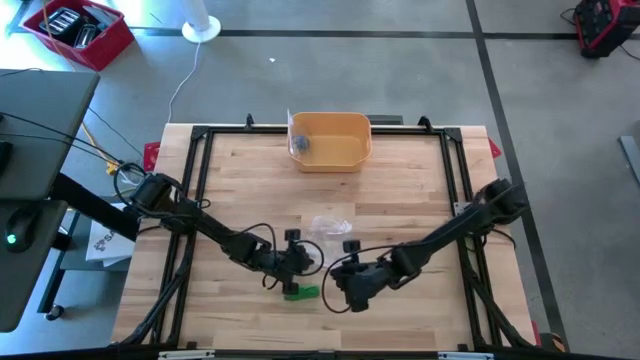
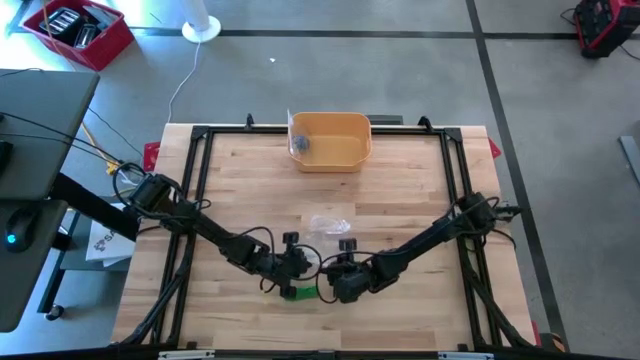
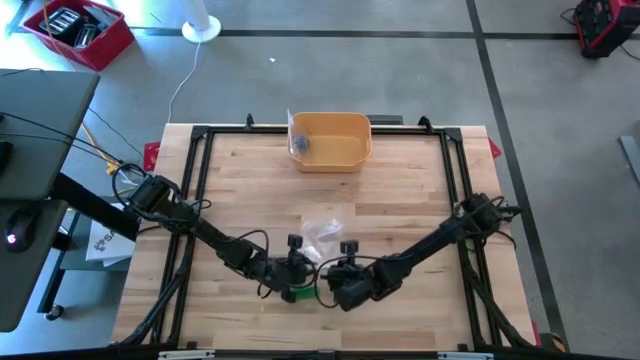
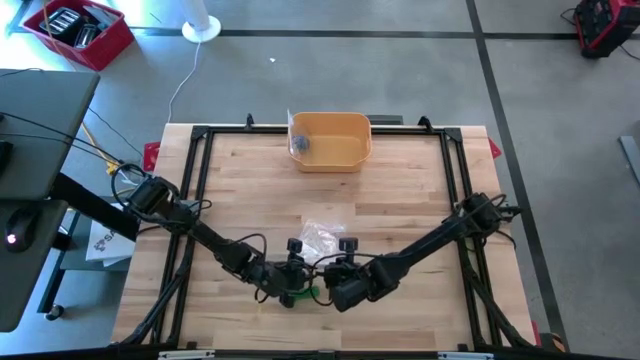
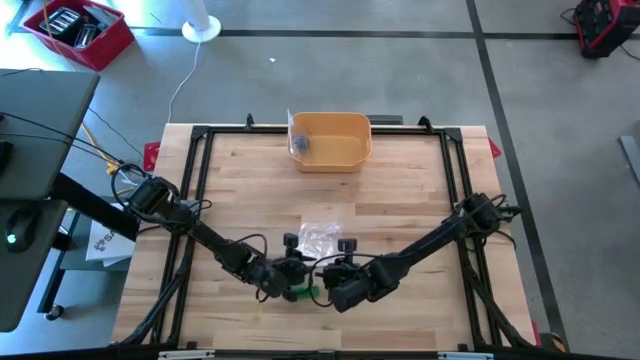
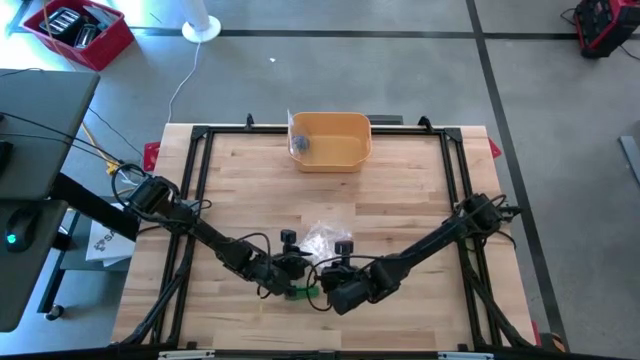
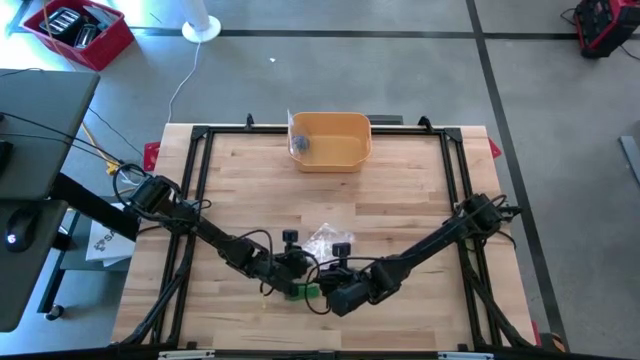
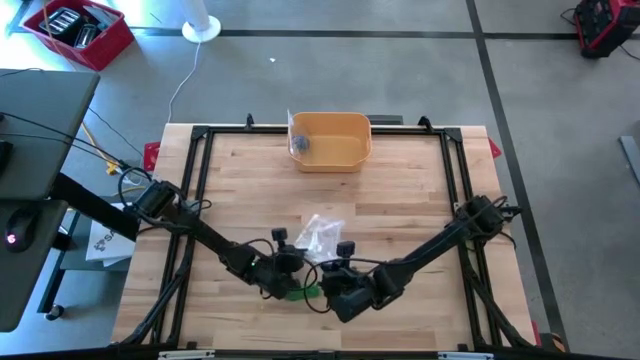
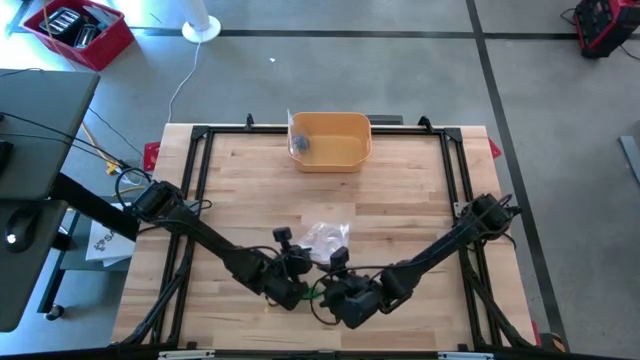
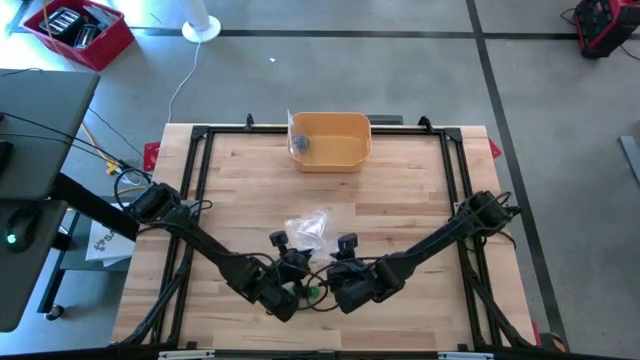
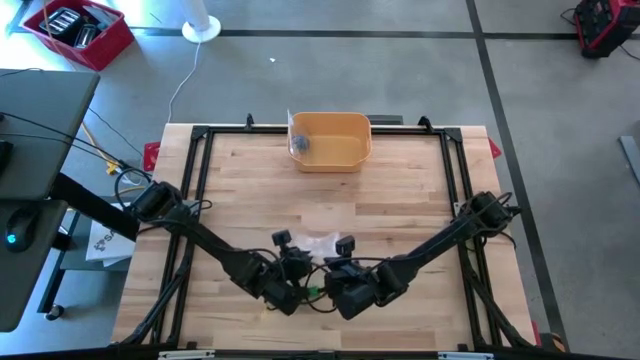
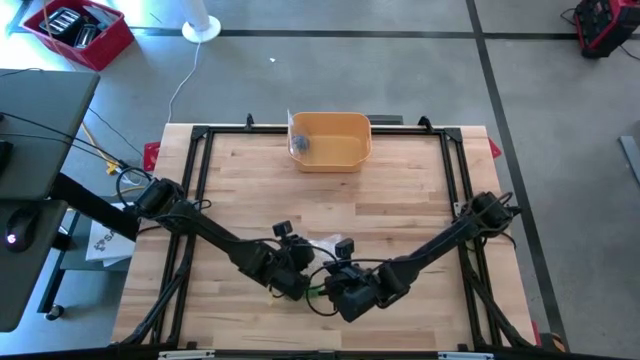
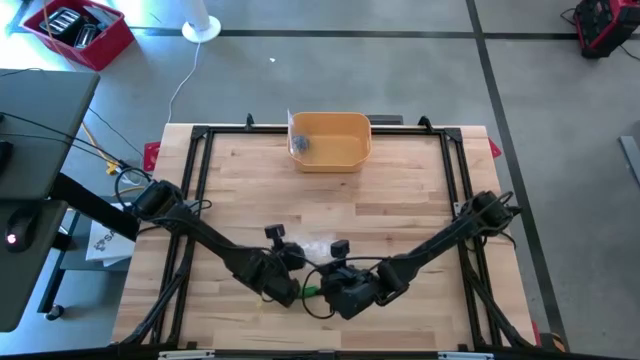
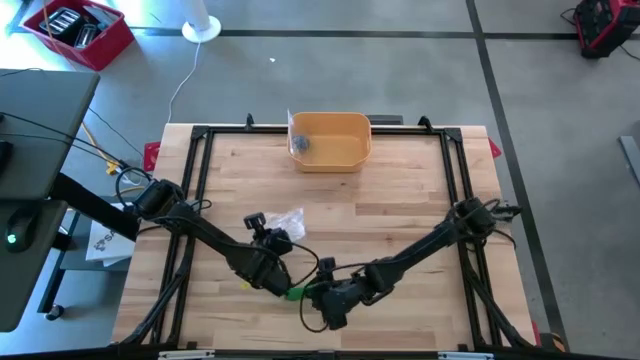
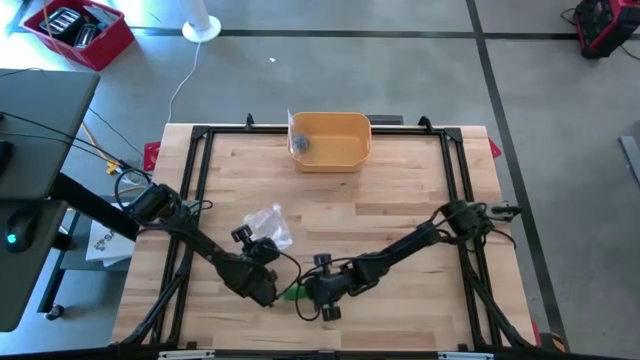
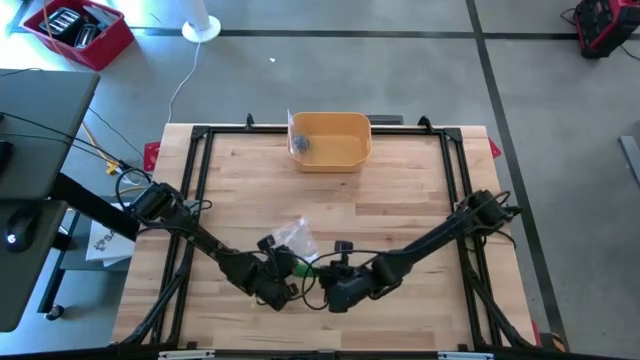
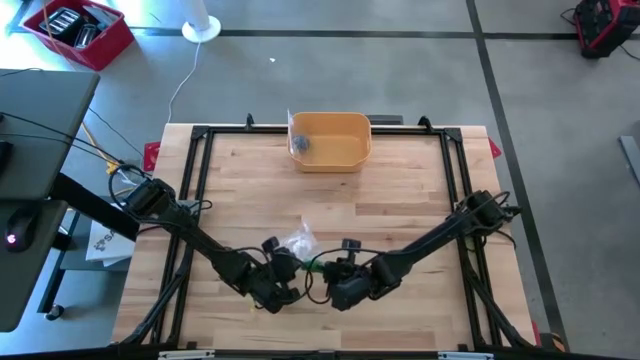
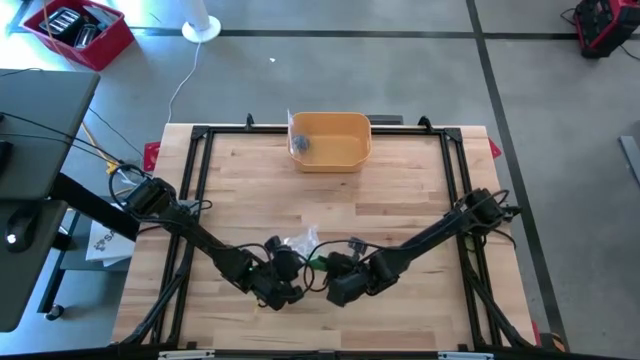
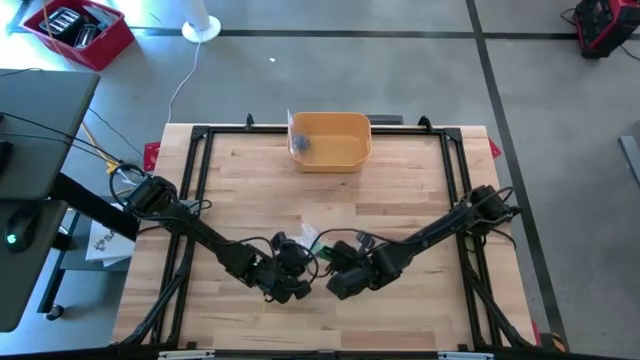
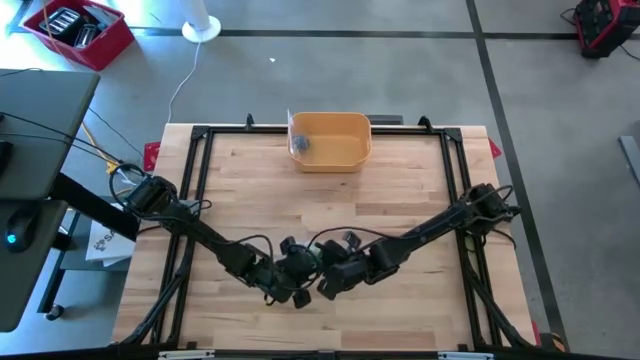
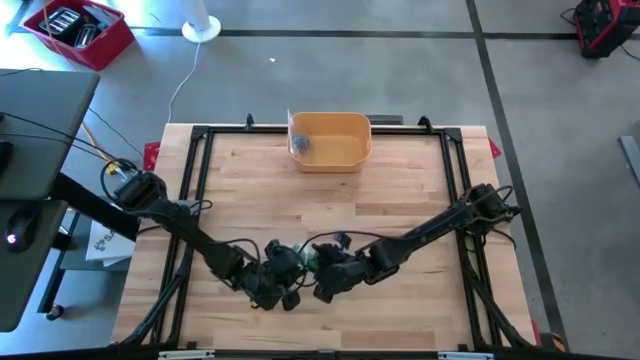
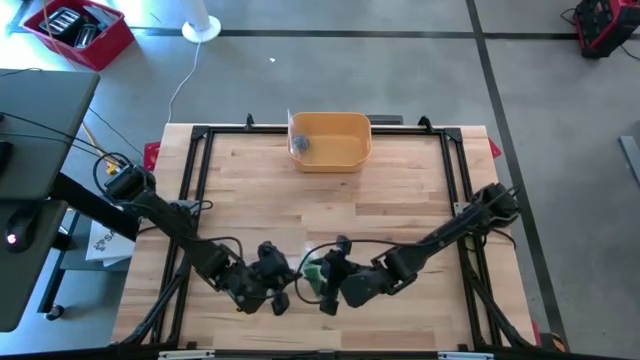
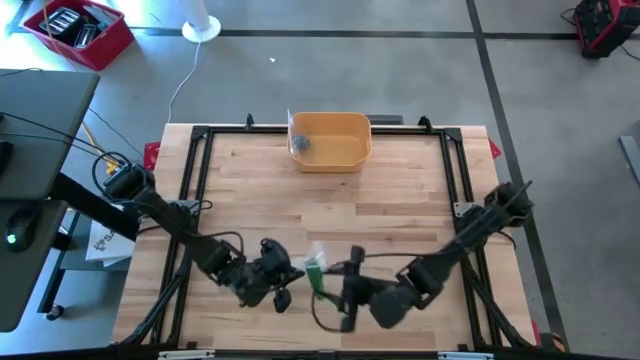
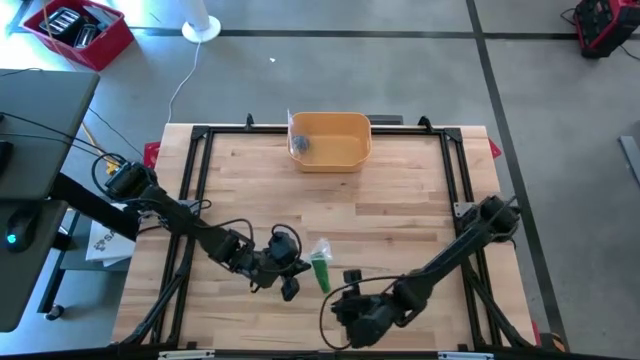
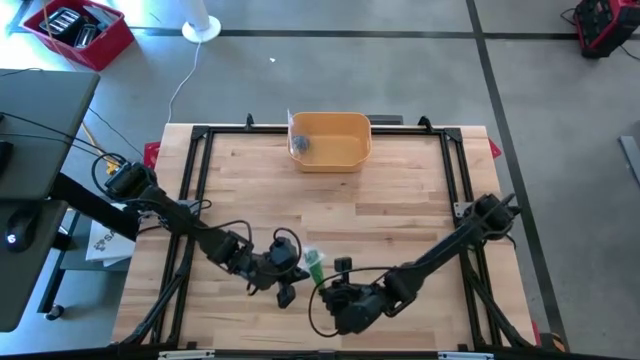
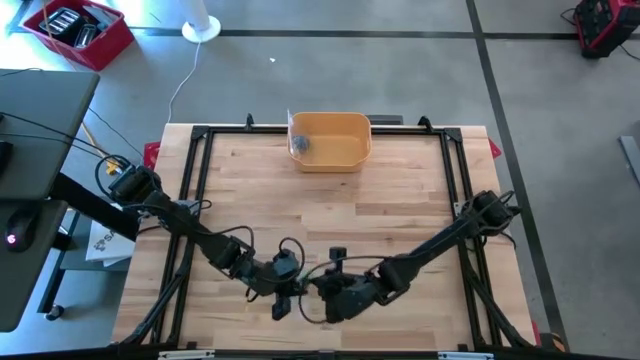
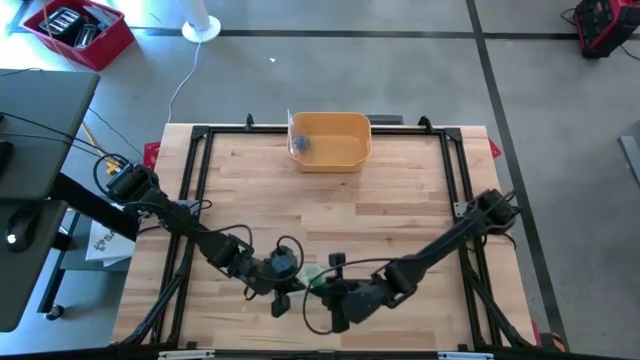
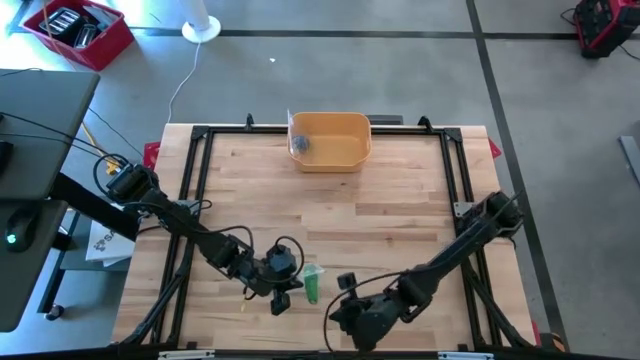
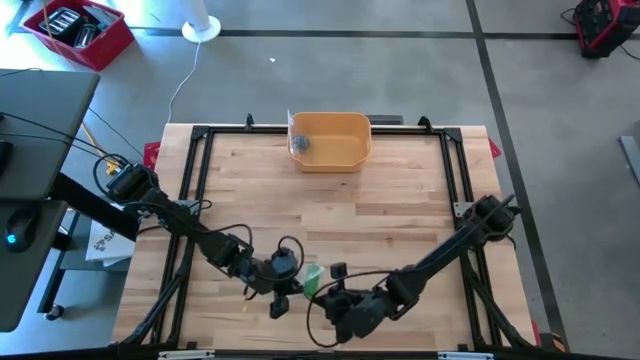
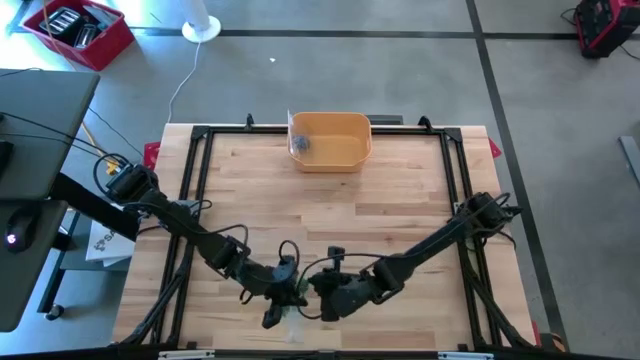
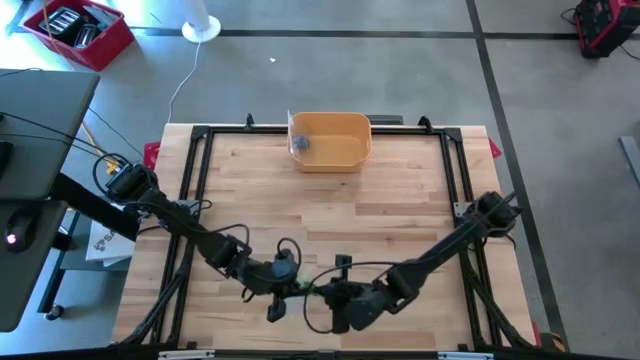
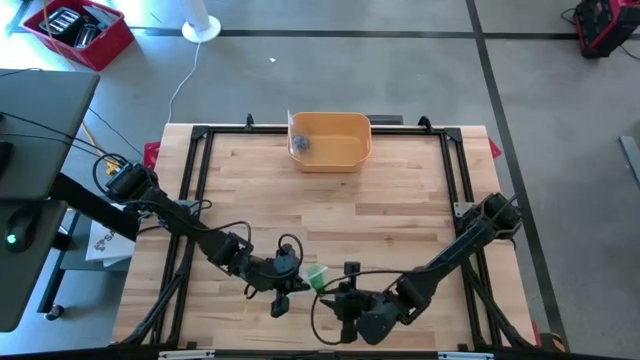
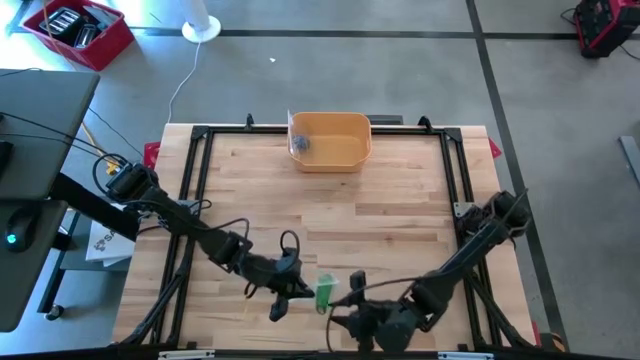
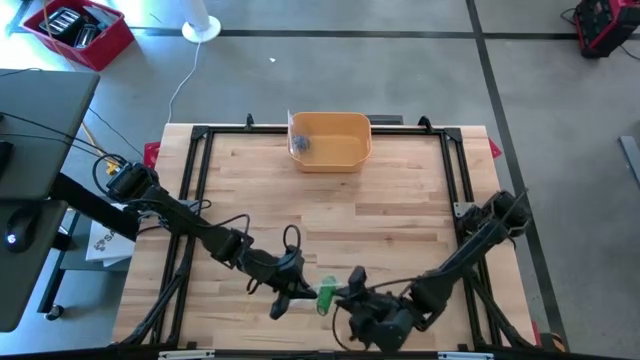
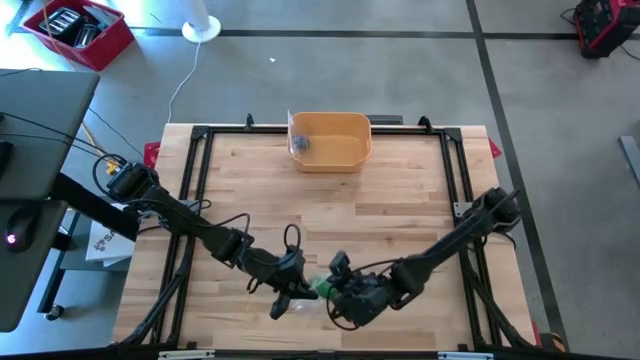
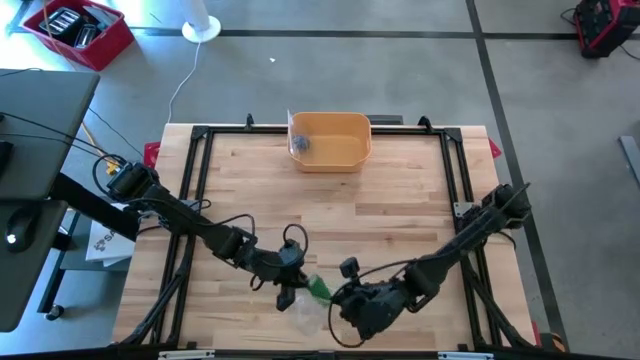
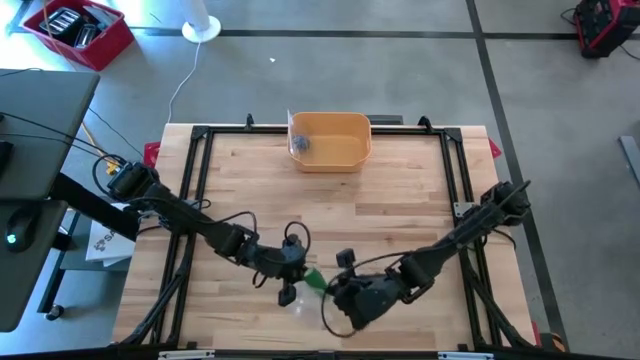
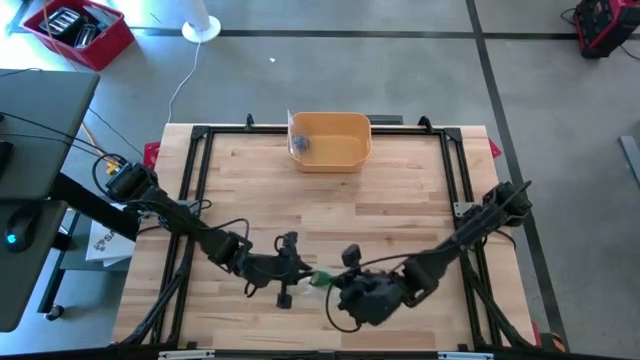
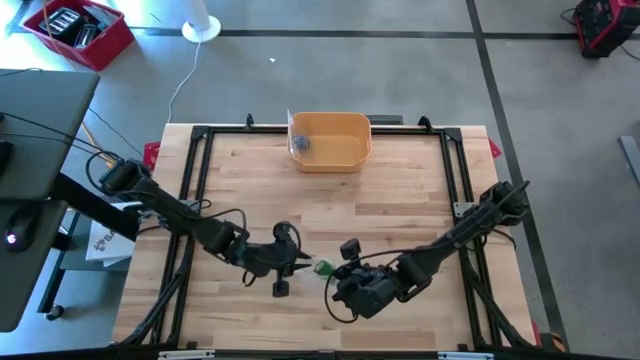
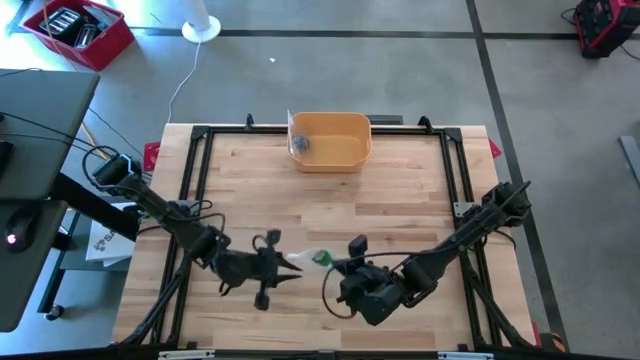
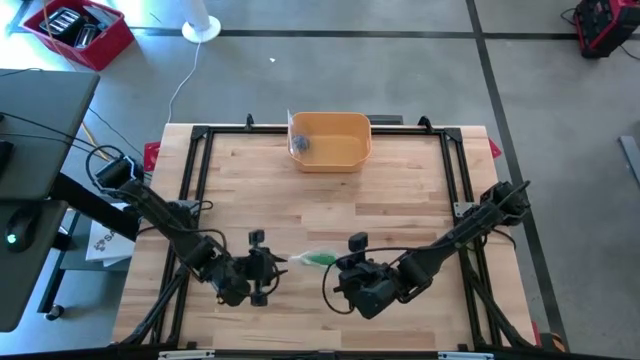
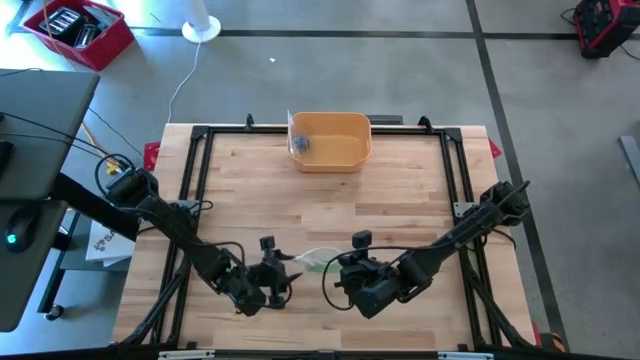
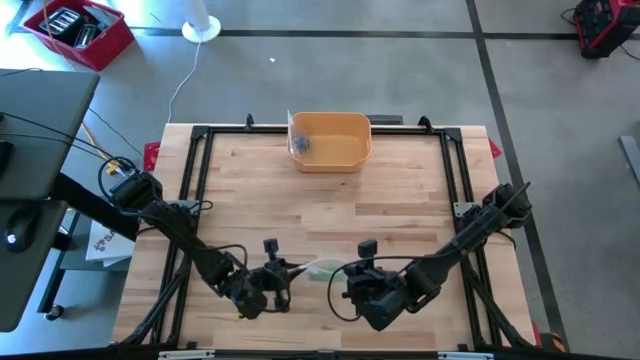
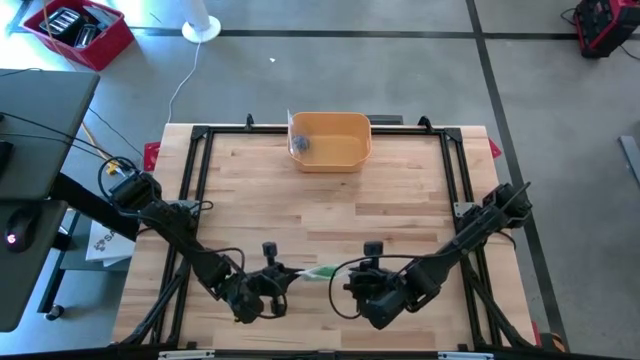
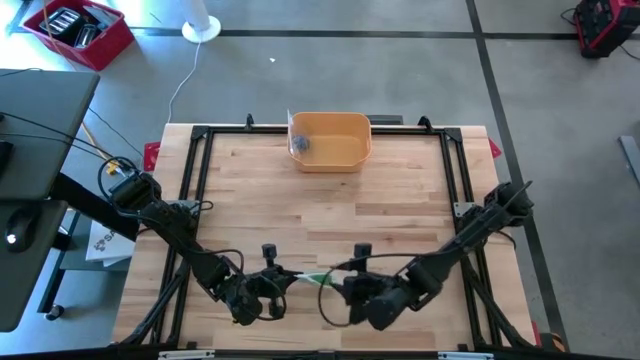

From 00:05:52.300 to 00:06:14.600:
Task: Roll bandage
Put the rolled green bandage into the transparent zip bag
